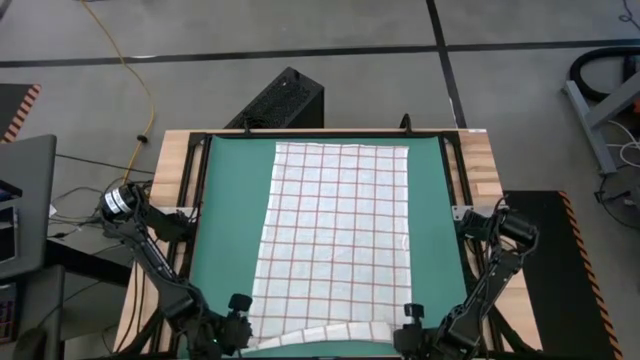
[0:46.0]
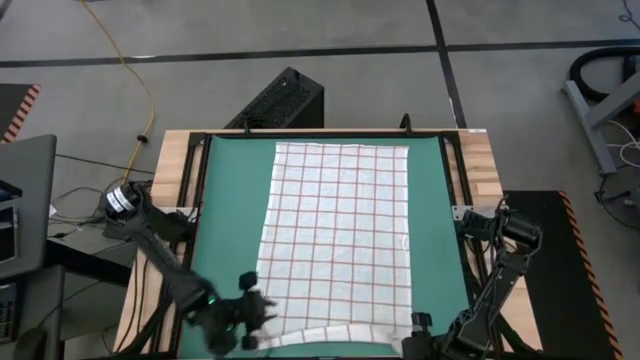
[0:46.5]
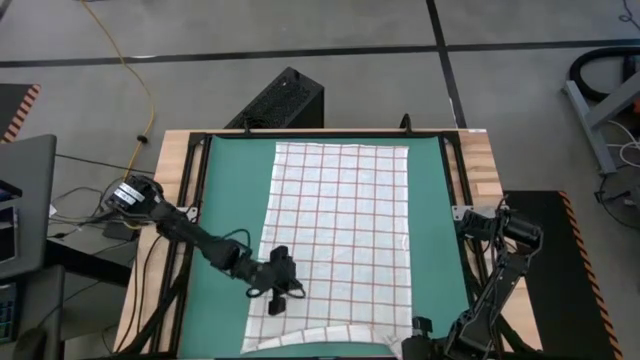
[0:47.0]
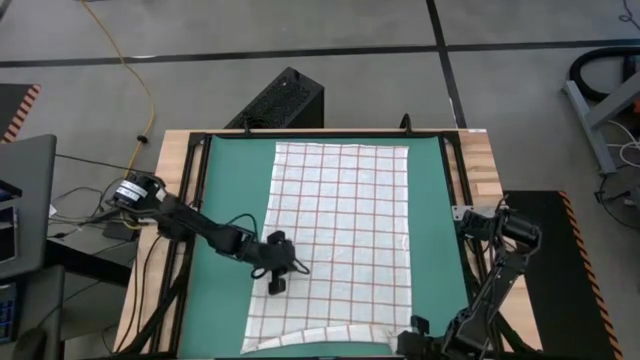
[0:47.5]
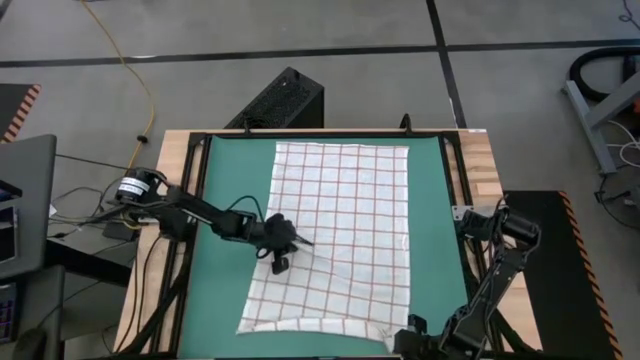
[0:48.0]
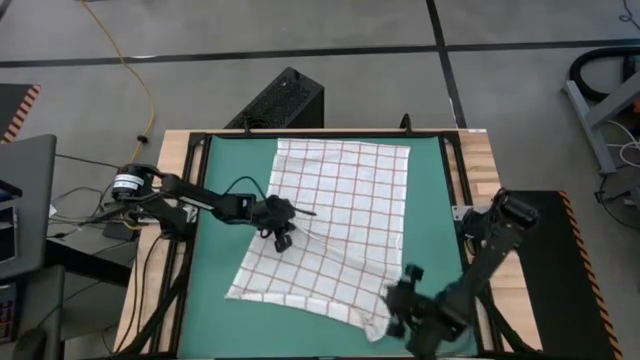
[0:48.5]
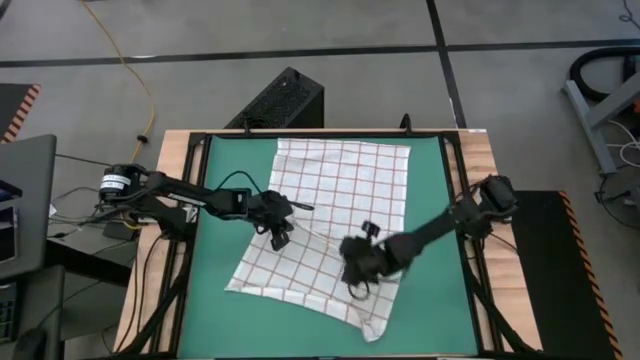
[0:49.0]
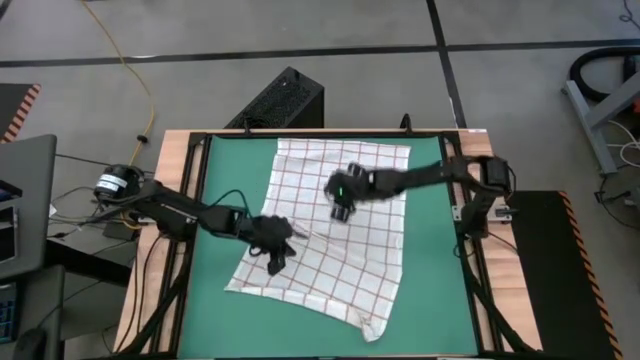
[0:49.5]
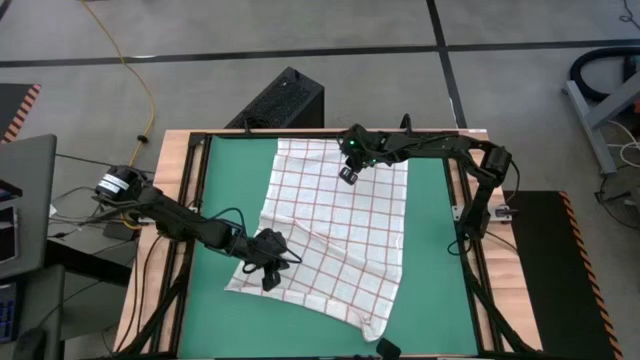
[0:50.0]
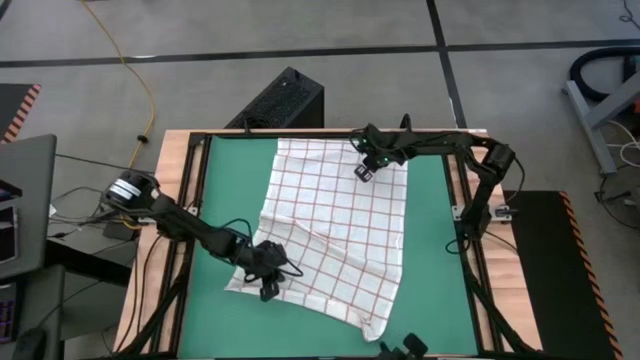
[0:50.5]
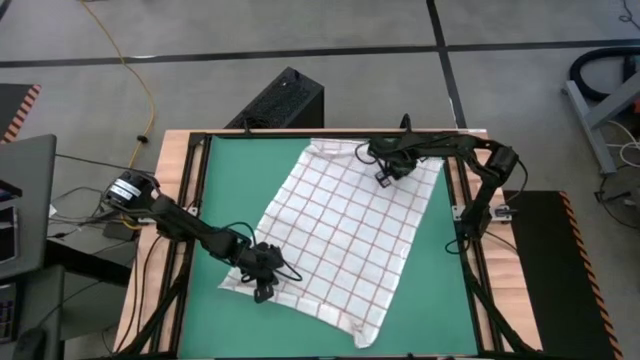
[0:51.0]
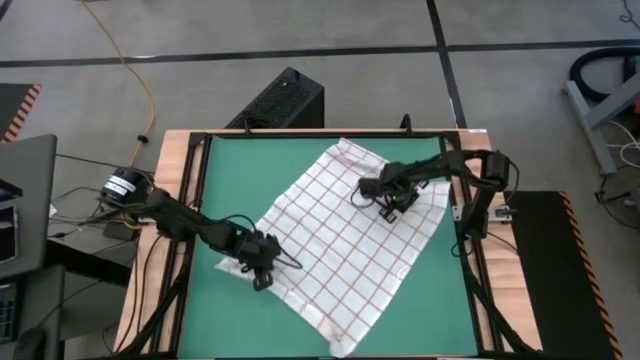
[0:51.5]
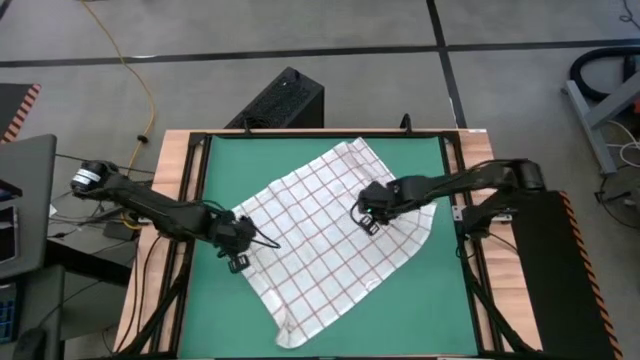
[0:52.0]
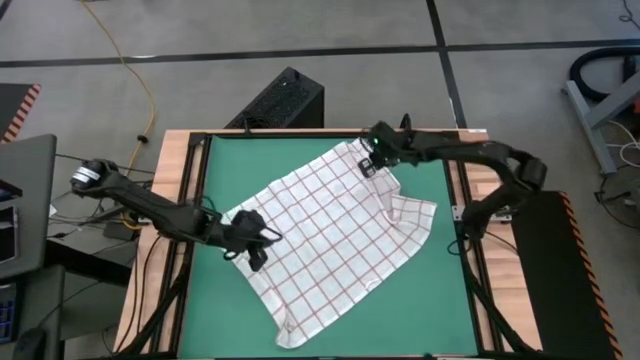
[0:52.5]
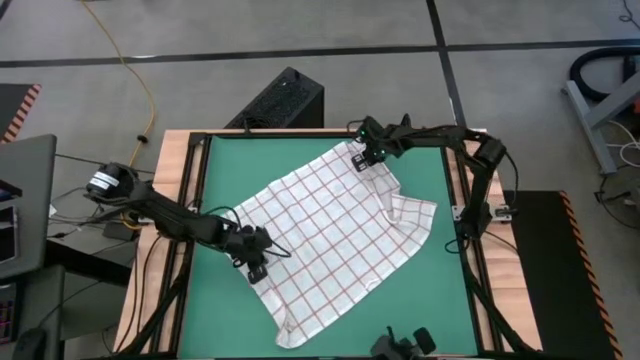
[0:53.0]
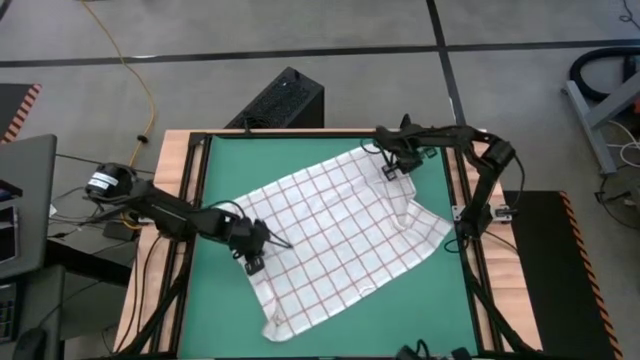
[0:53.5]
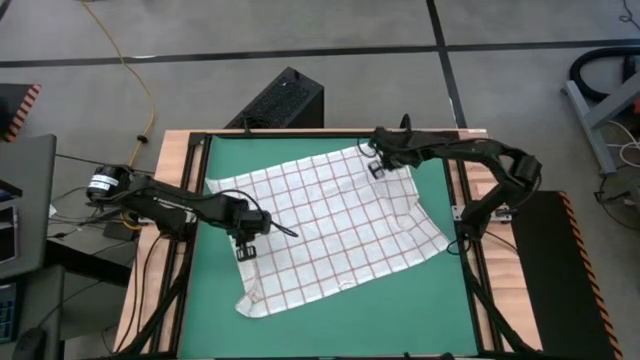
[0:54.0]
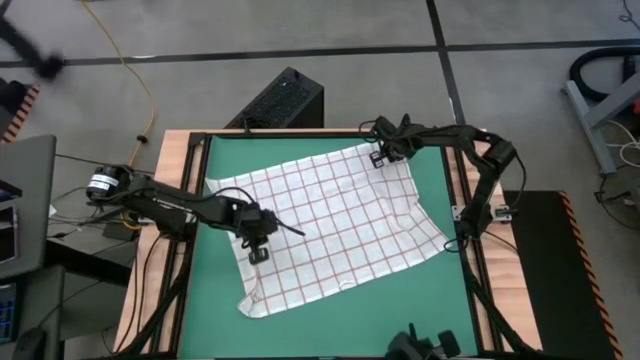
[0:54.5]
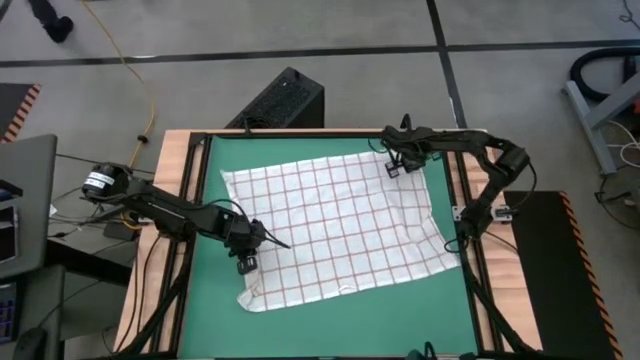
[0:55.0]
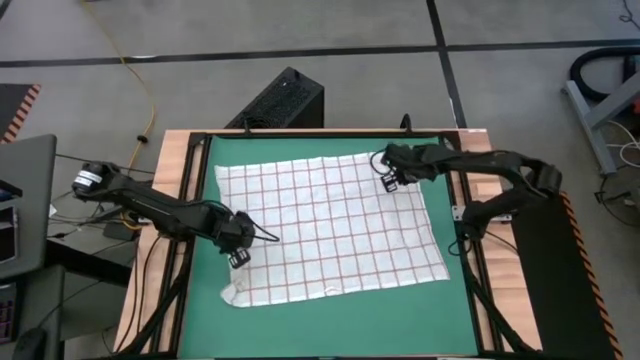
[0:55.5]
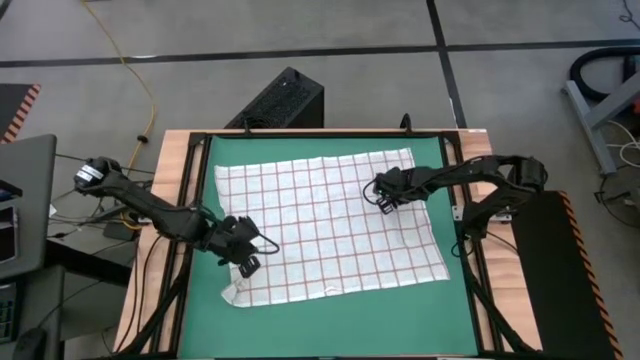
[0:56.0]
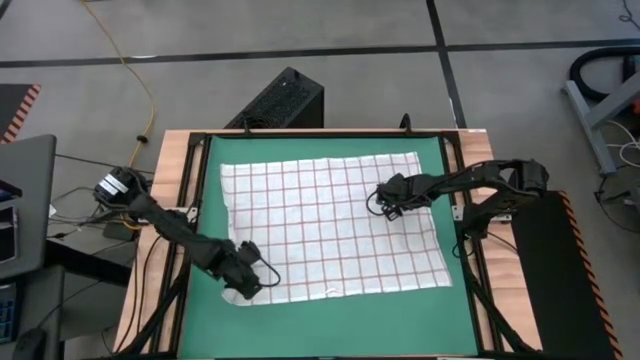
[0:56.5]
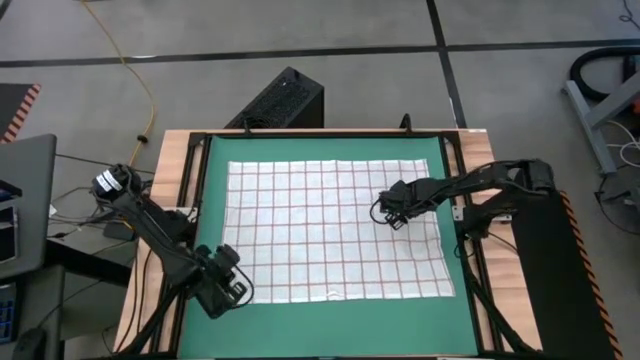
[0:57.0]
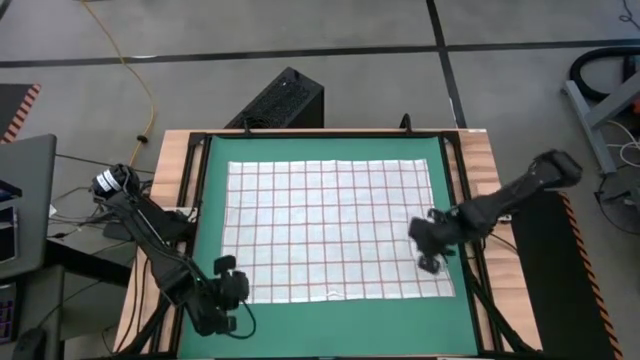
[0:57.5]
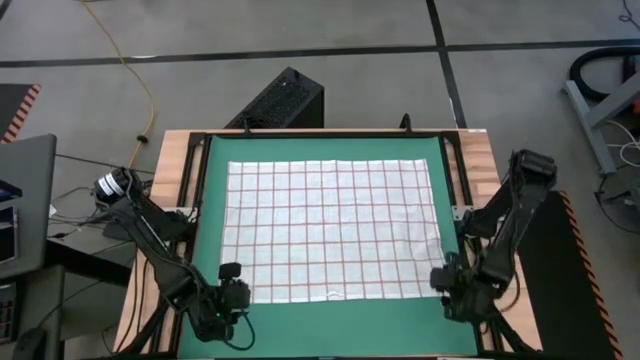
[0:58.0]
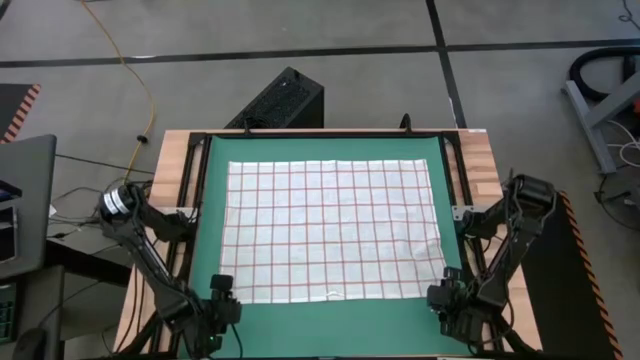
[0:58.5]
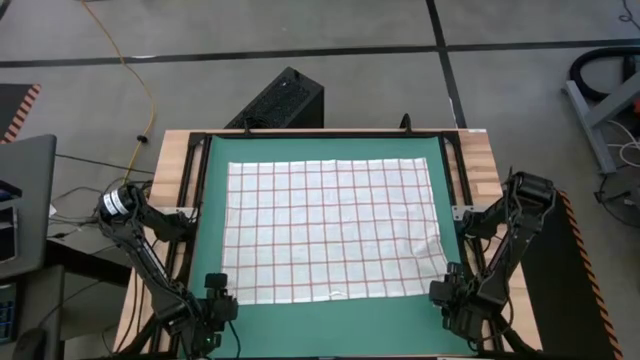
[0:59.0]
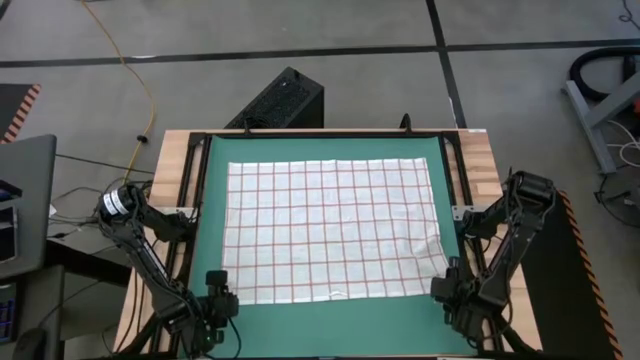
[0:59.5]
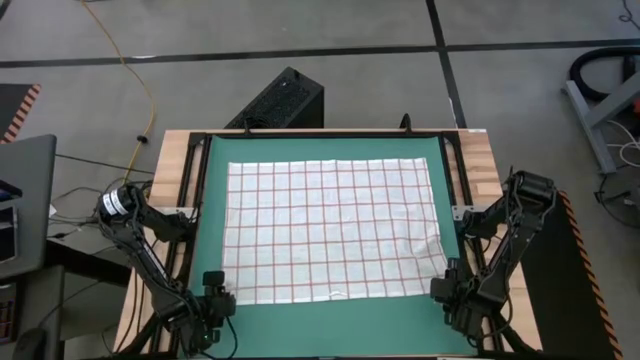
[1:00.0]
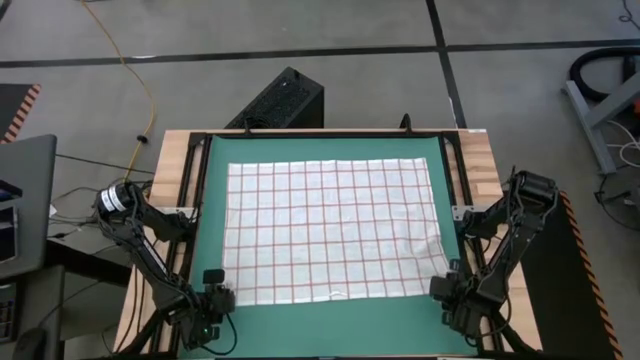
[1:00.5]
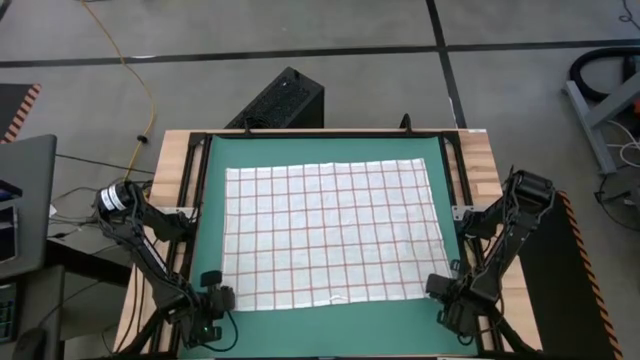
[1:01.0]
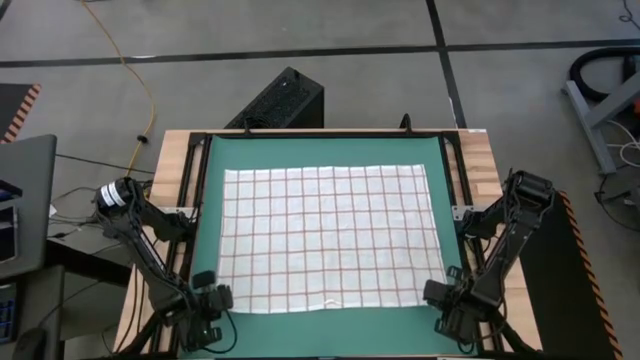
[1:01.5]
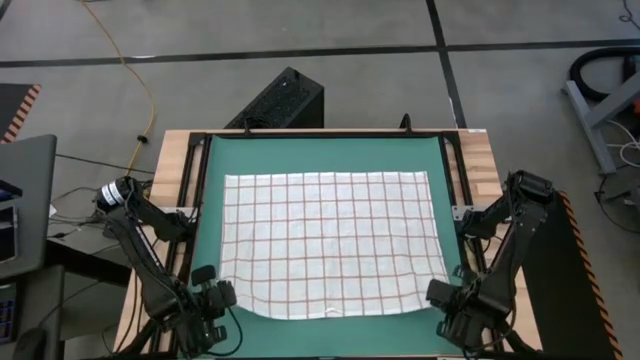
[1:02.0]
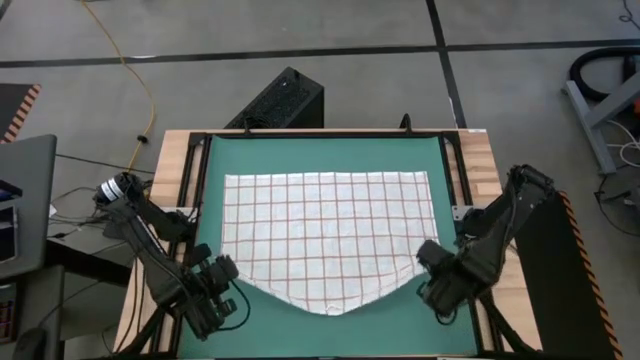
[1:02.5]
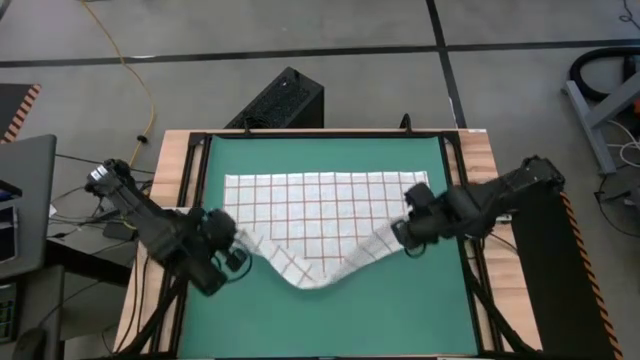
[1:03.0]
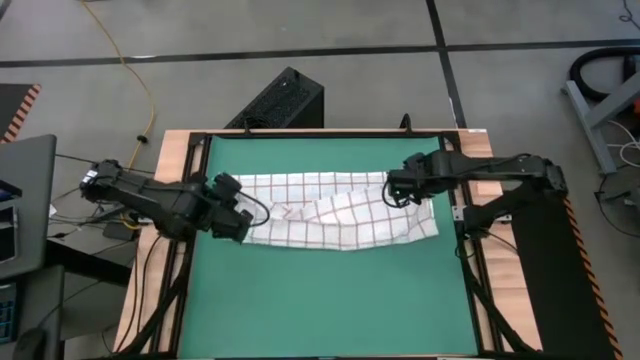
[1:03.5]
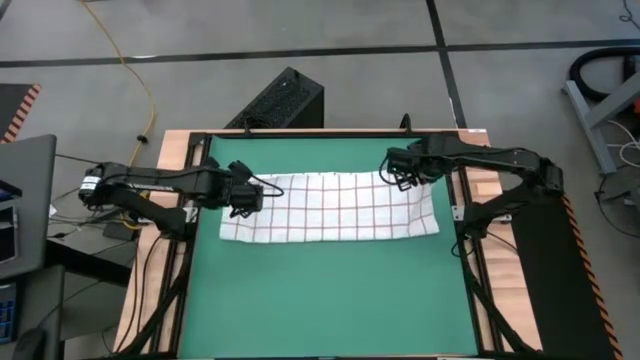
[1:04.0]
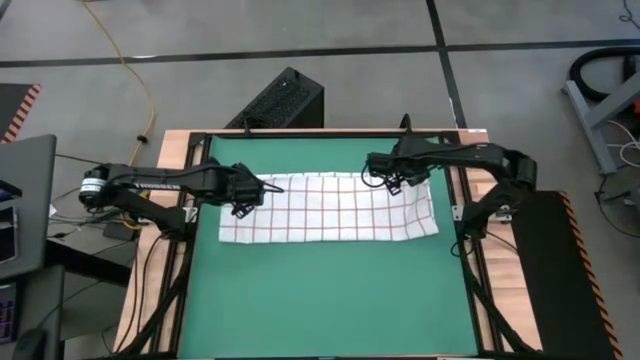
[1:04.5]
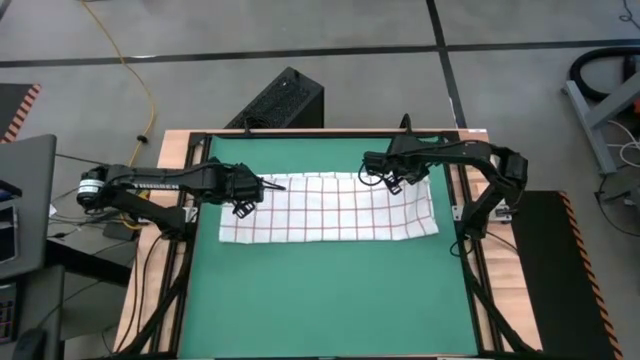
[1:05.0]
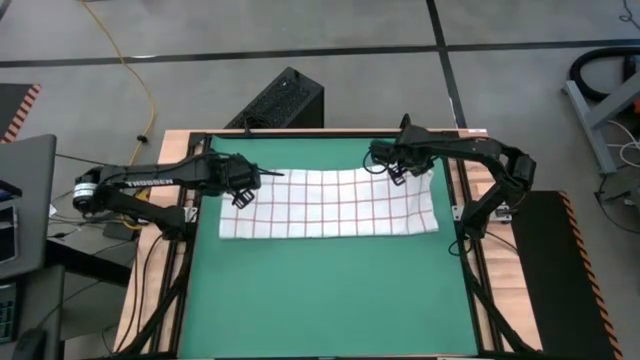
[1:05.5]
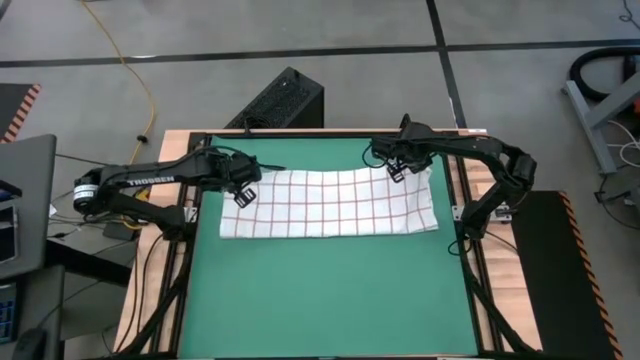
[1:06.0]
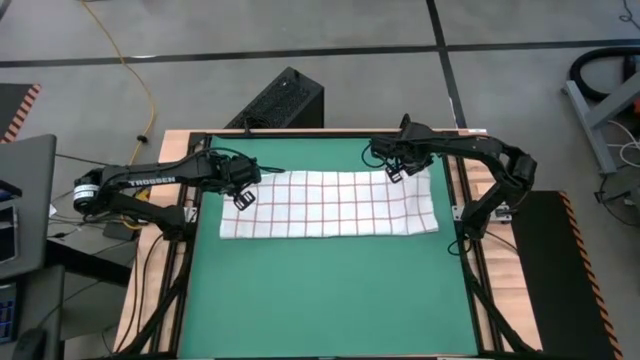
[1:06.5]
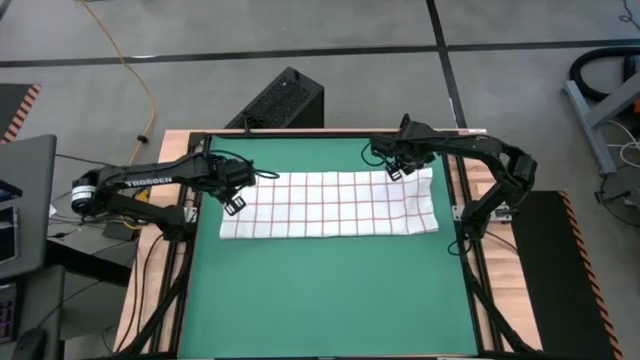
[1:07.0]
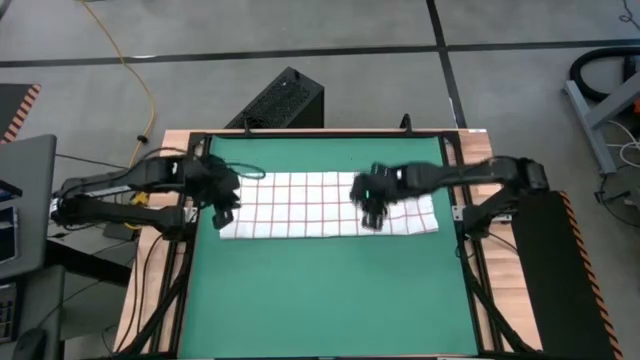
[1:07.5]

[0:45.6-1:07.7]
Task: Roll towel into tight, uniform cylinder
Roll the white patterned towel
